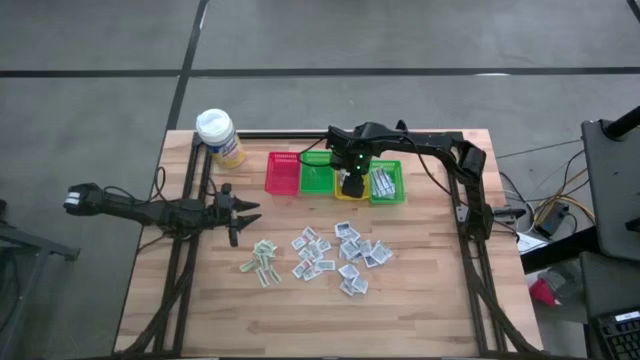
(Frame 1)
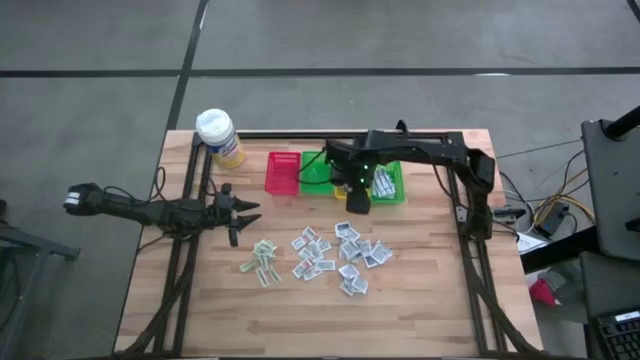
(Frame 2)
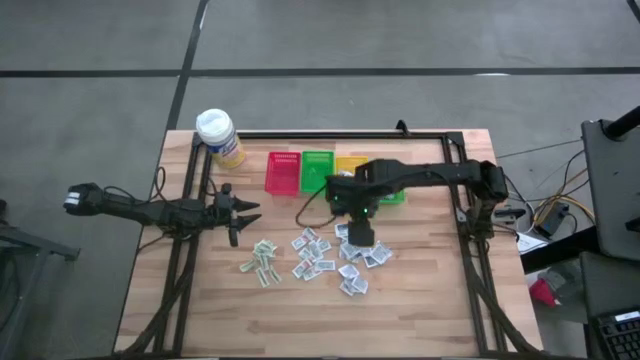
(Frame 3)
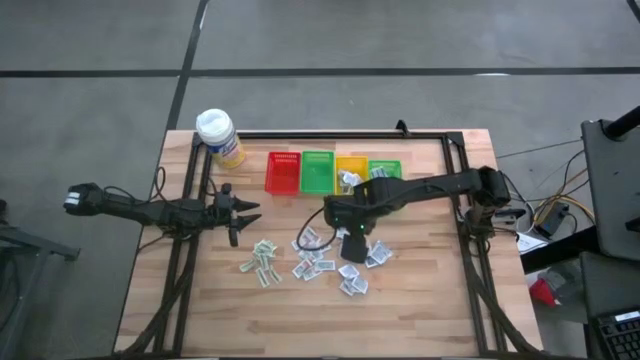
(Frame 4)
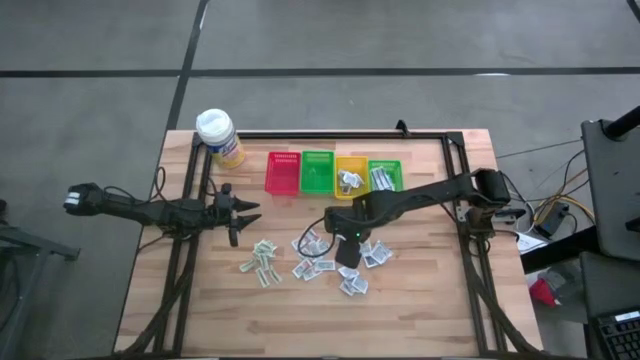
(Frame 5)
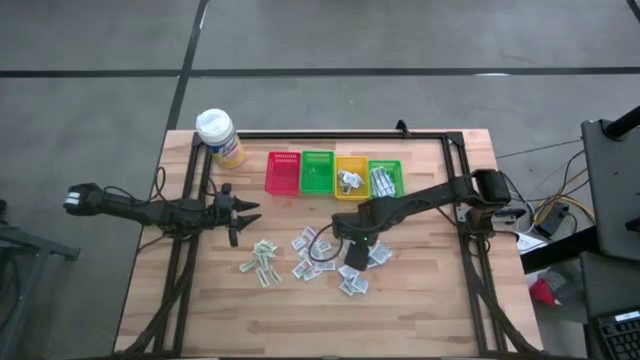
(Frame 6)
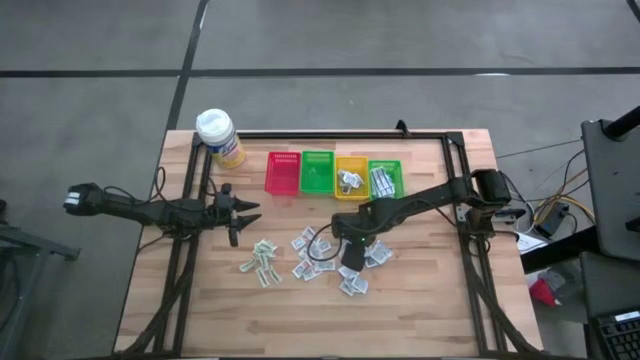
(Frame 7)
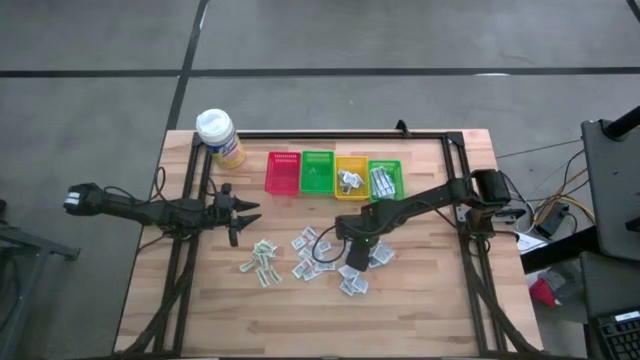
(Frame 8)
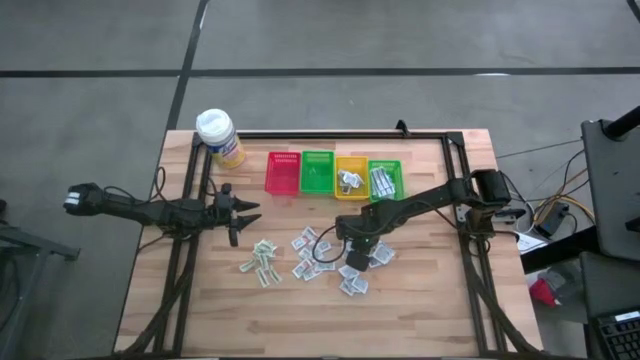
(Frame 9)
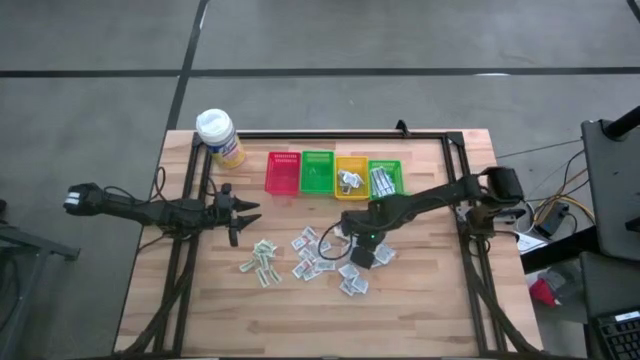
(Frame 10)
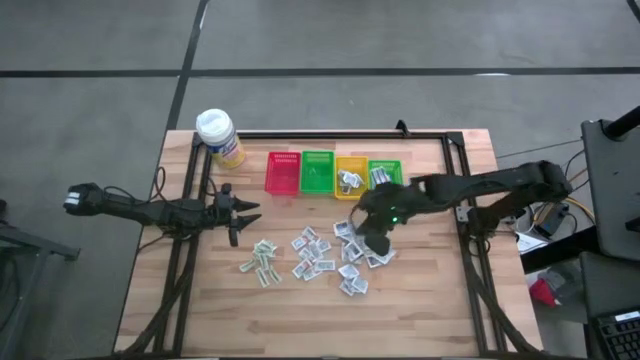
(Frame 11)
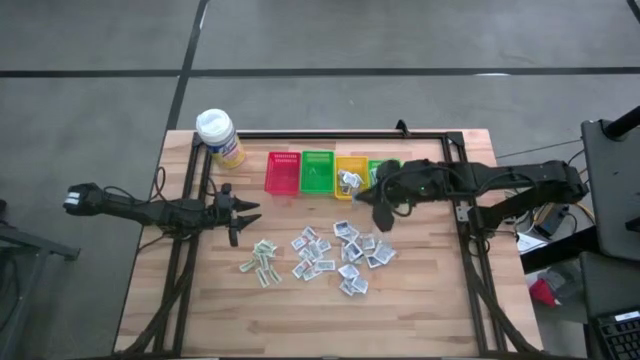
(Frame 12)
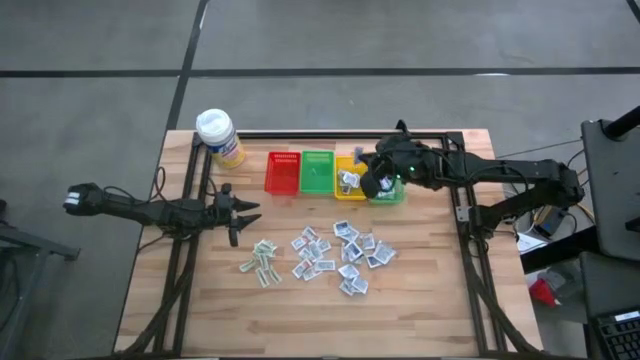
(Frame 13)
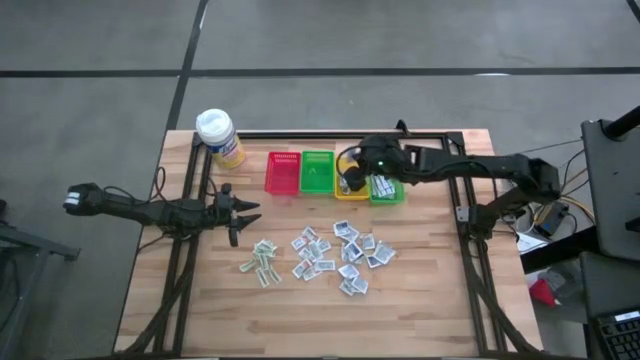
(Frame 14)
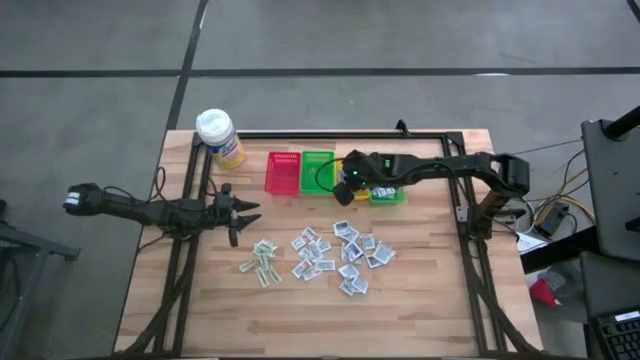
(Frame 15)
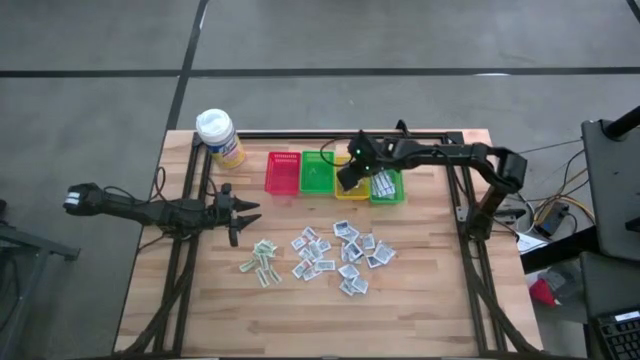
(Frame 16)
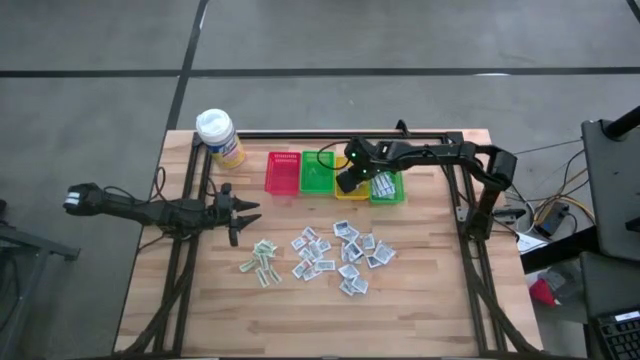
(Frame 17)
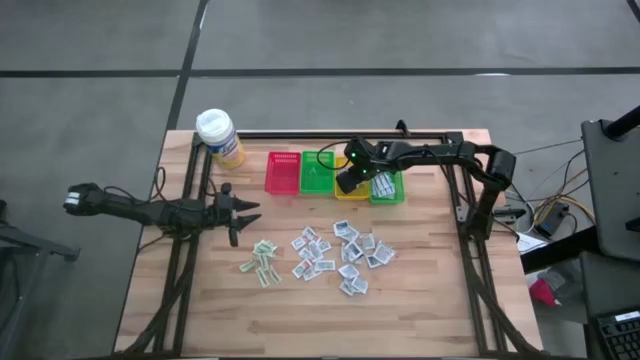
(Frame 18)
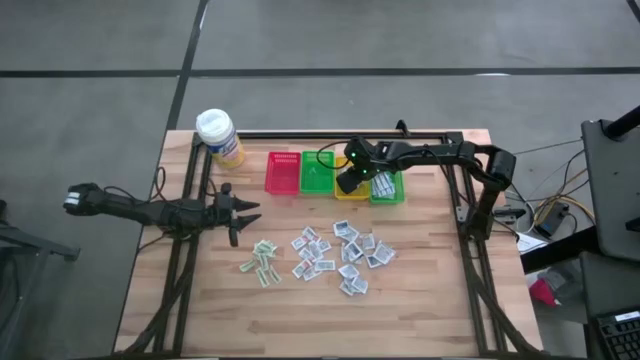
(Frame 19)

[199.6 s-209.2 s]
Task: Pick & Place First Aid Supplies
Put the blue alcohol pad into the yellow bin

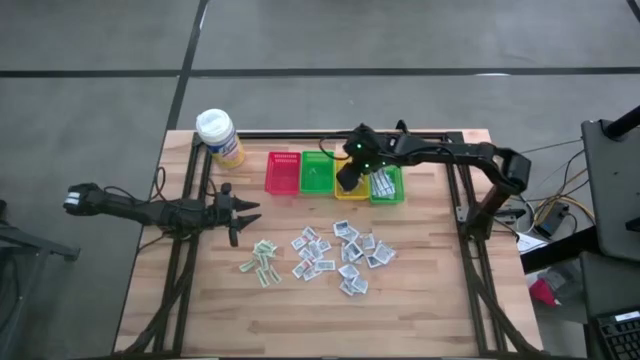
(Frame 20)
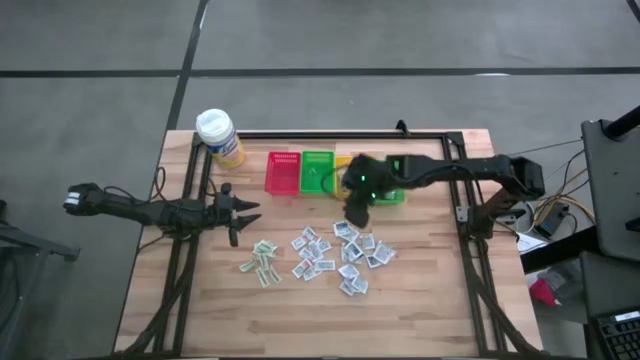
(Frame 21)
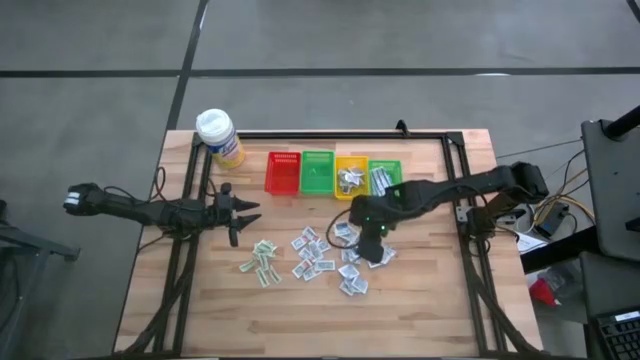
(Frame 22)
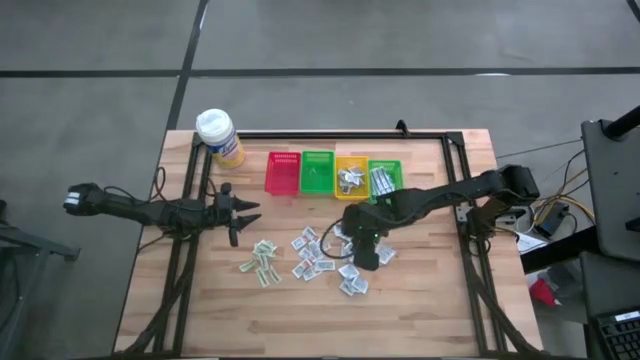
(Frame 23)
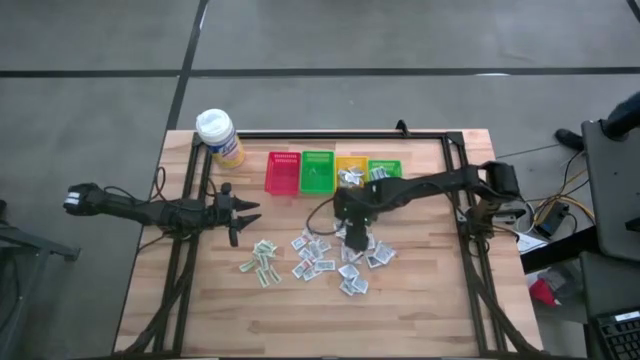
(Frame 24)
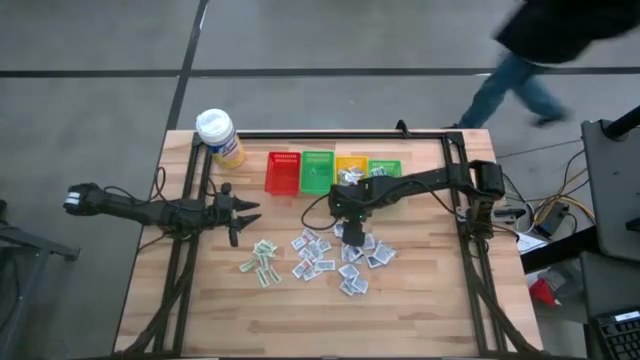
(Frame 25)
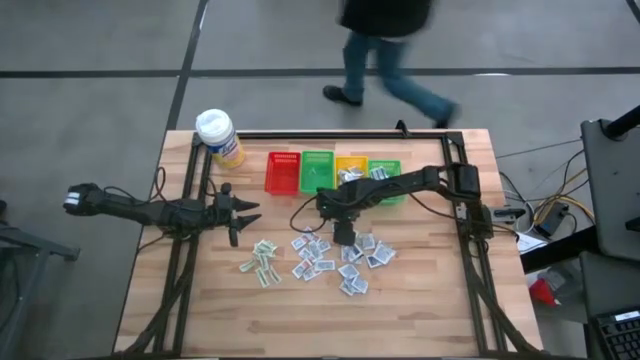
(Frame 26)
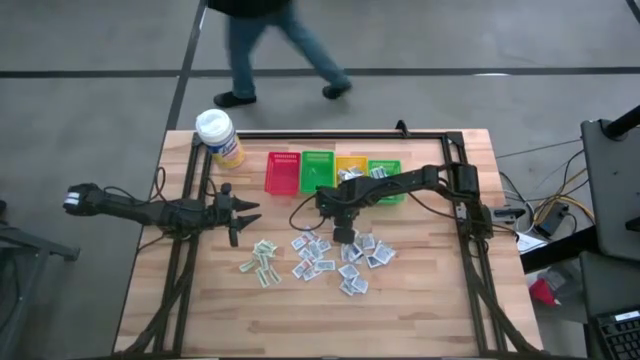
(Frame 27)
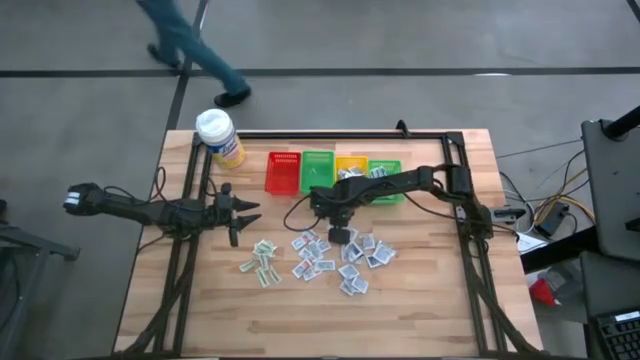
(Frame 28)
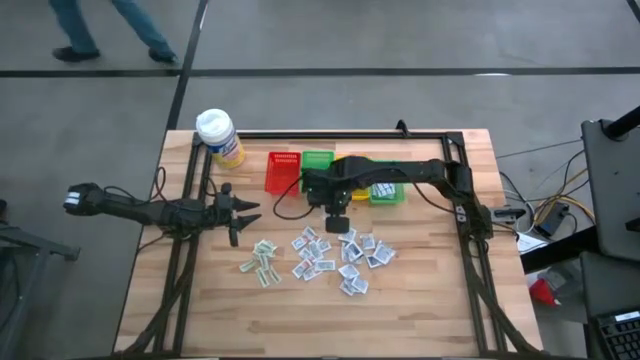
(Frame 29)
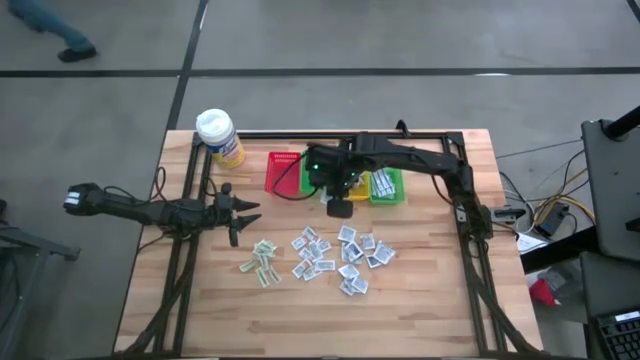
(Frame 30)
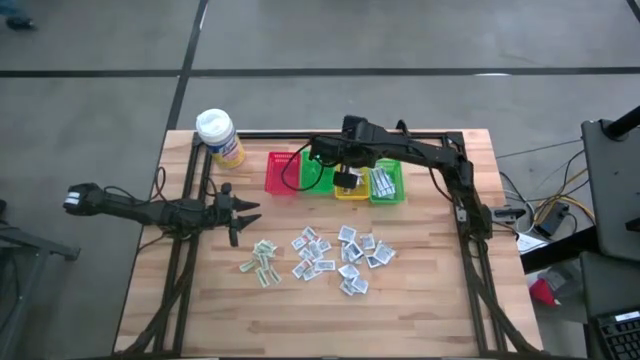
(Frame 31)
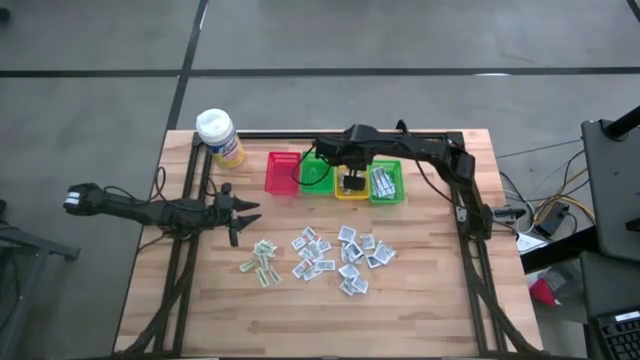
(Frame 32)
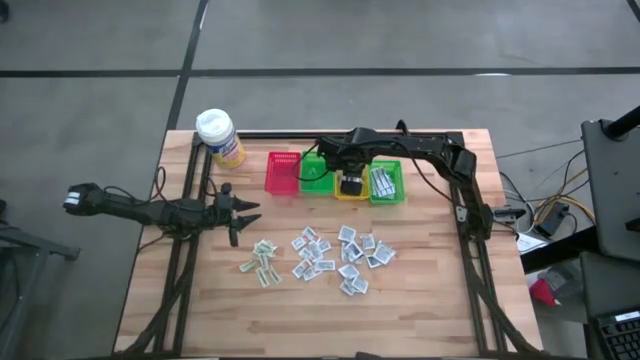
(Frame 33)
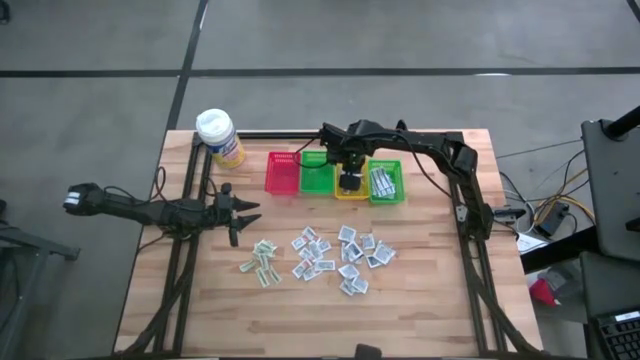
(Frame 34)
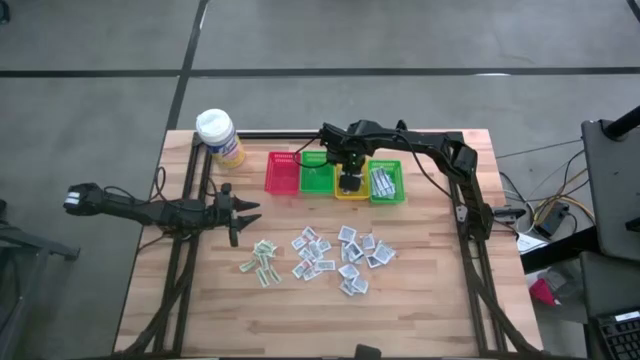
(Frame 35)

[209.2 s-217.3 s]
Put the blue alcohol pad into the yellow bin

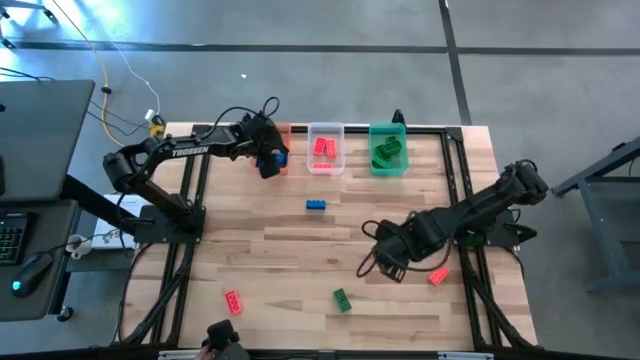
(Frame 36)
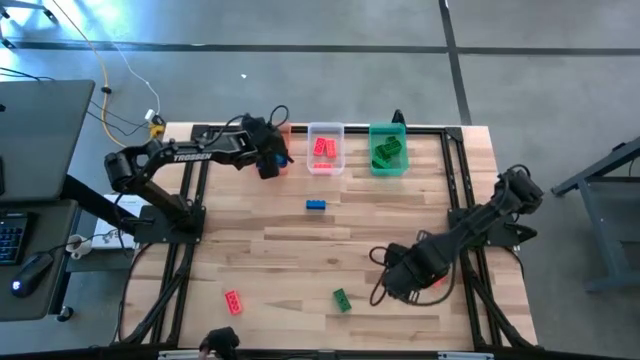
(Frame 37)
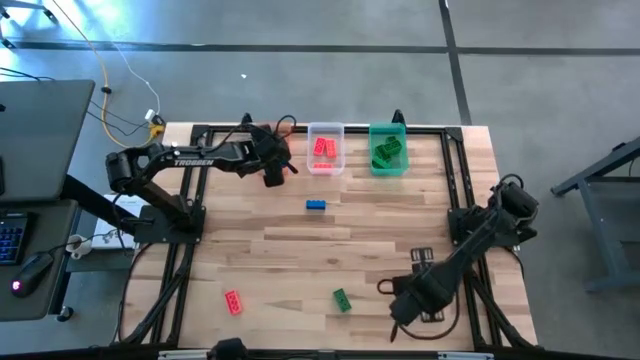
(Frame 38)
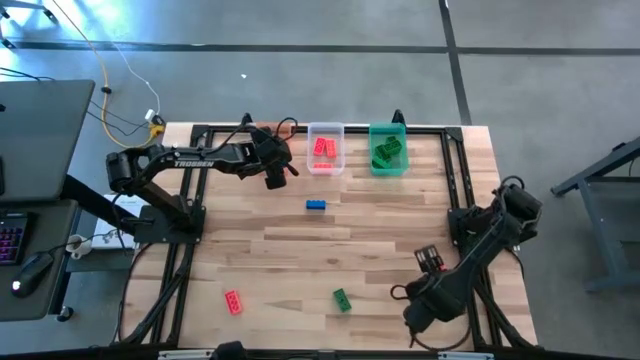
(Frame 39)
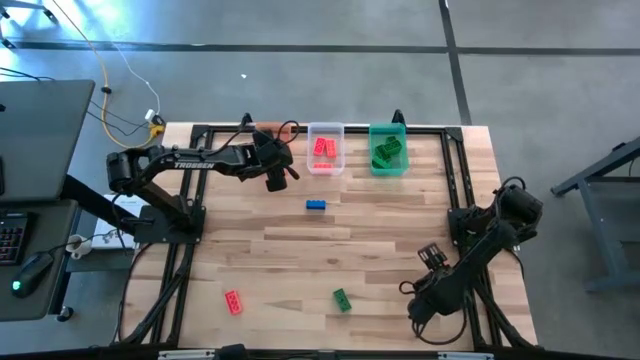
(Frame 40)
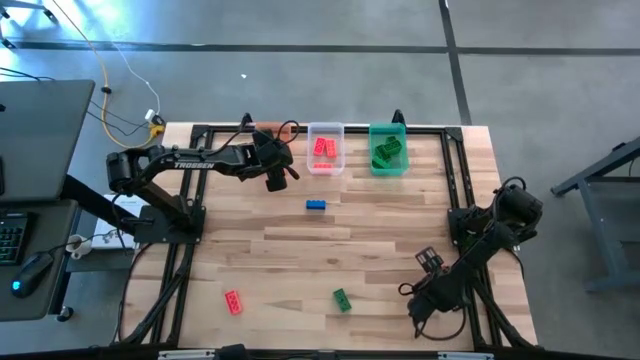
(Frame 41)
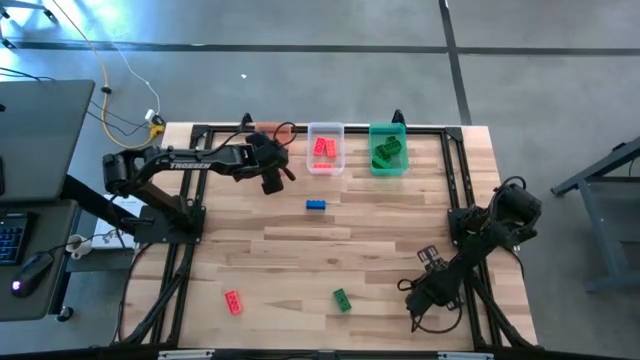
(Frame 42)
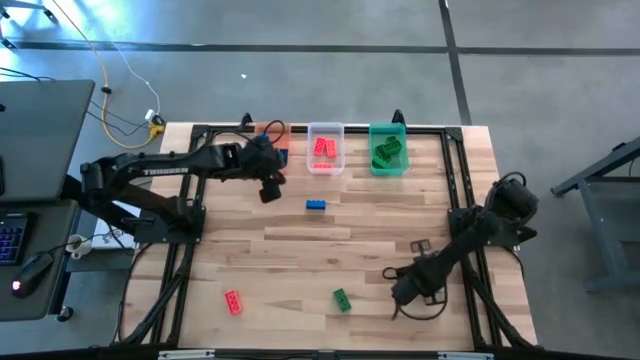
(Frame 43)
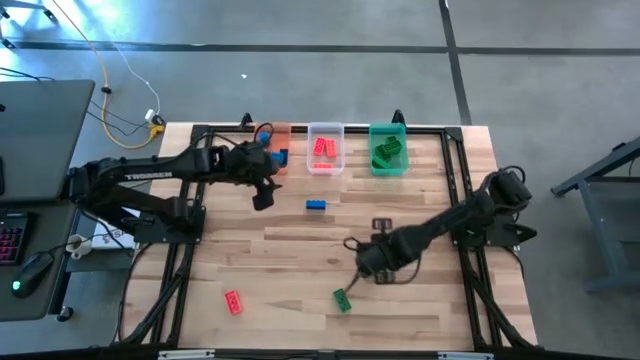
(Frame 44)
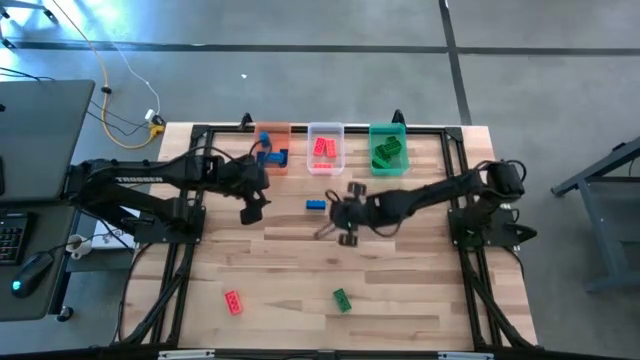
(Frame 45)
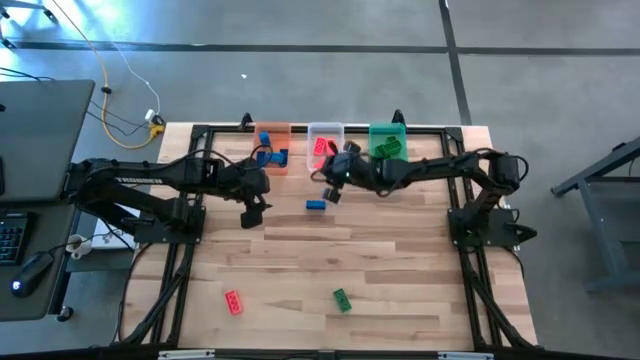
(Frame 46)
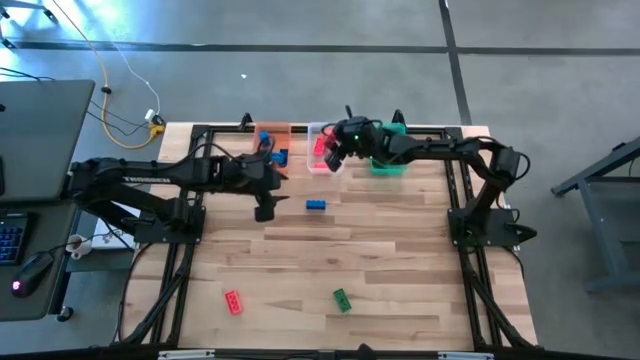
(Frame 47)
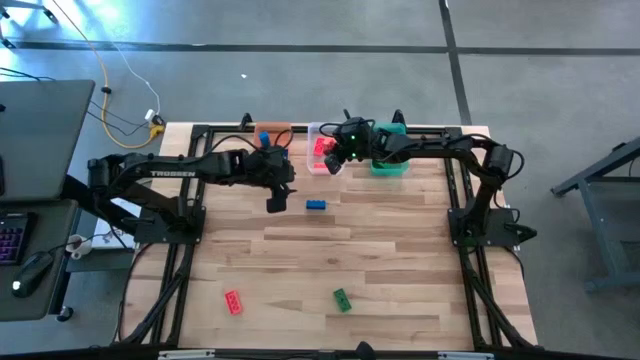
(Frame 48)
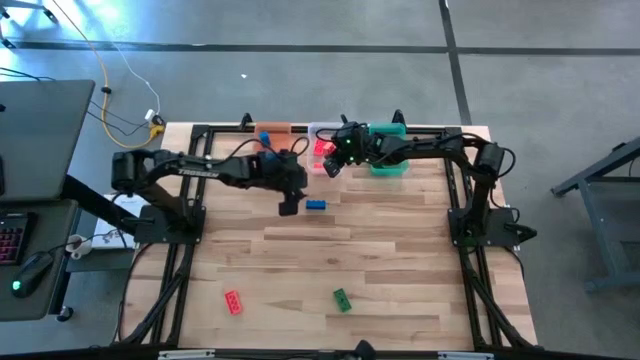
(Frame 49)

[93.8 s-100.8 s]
Task: Sort & place blocks by color
Put the orange game piece into the white bin
